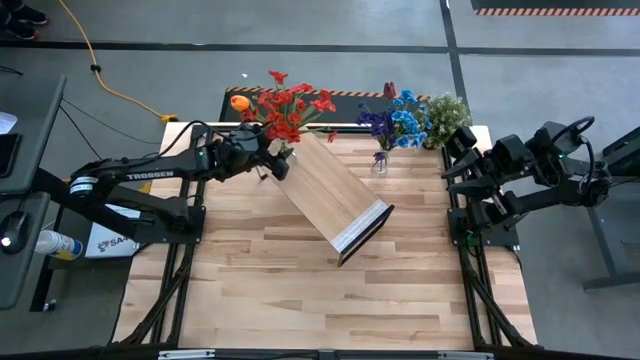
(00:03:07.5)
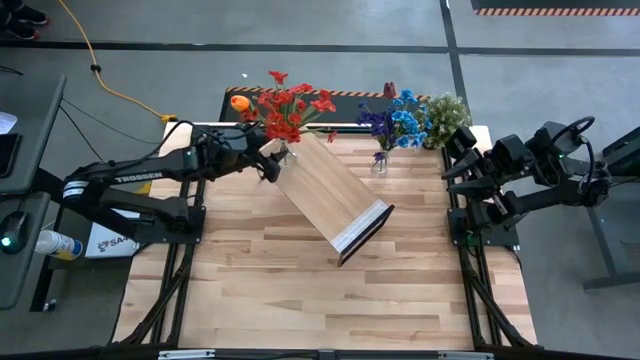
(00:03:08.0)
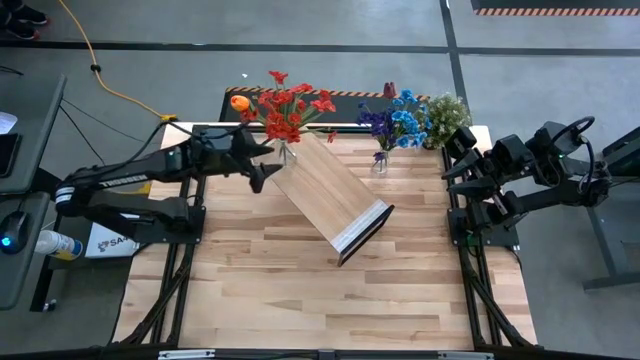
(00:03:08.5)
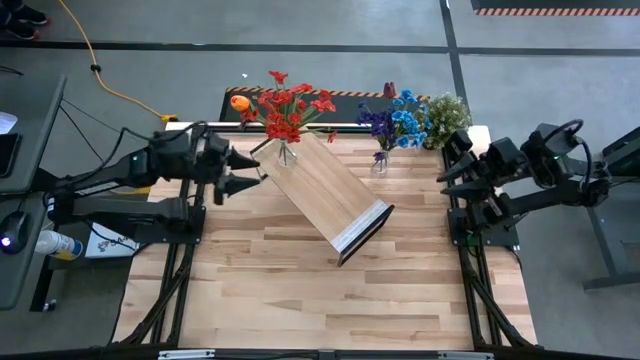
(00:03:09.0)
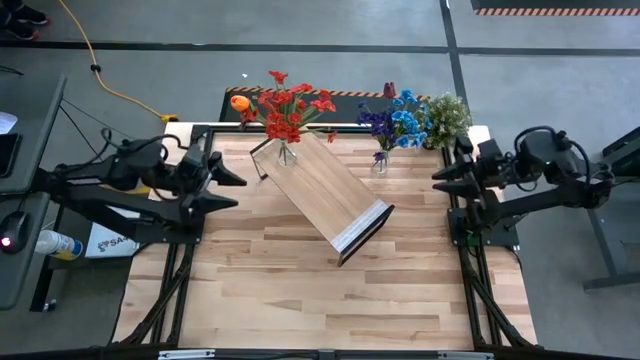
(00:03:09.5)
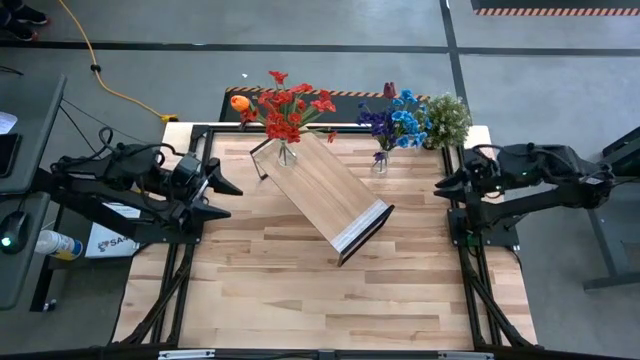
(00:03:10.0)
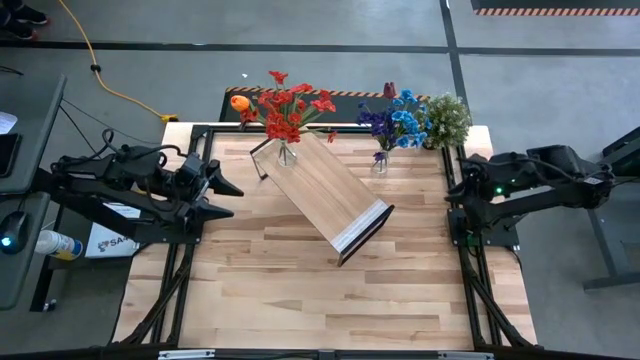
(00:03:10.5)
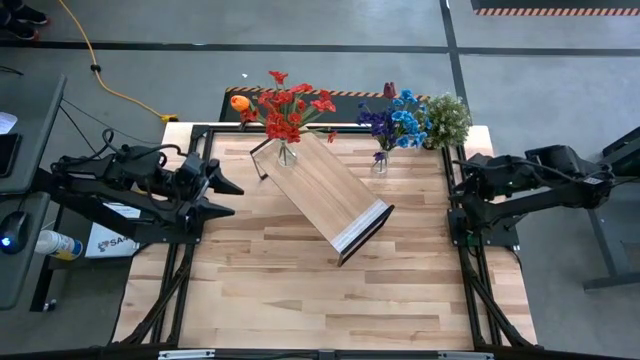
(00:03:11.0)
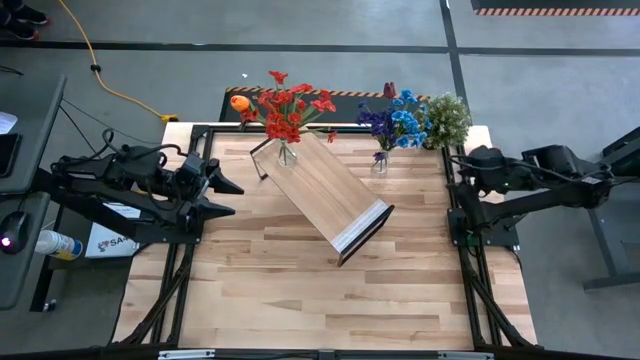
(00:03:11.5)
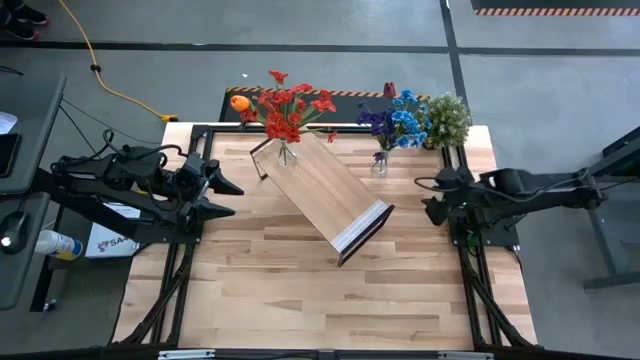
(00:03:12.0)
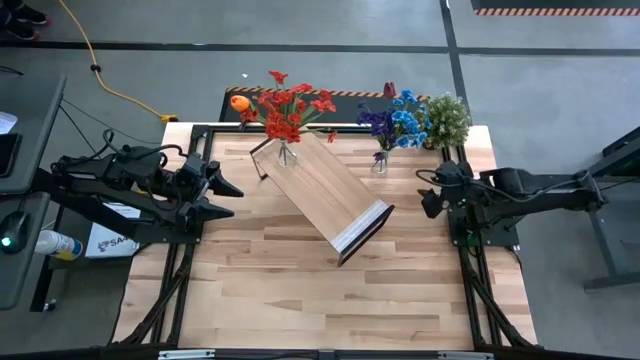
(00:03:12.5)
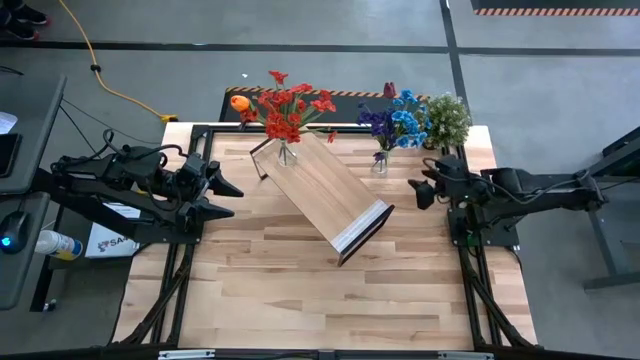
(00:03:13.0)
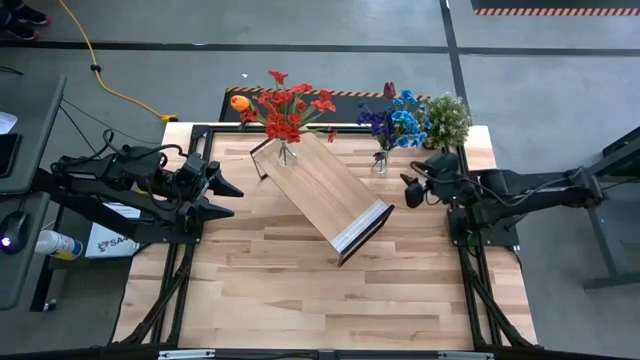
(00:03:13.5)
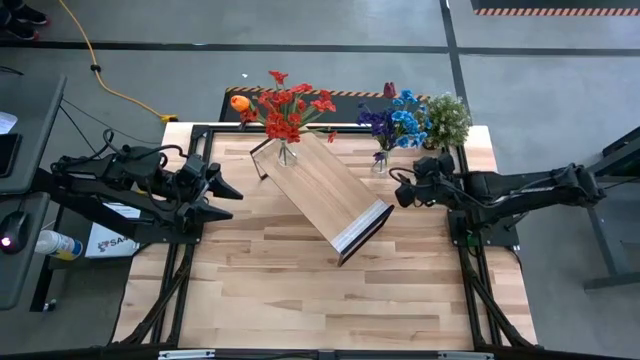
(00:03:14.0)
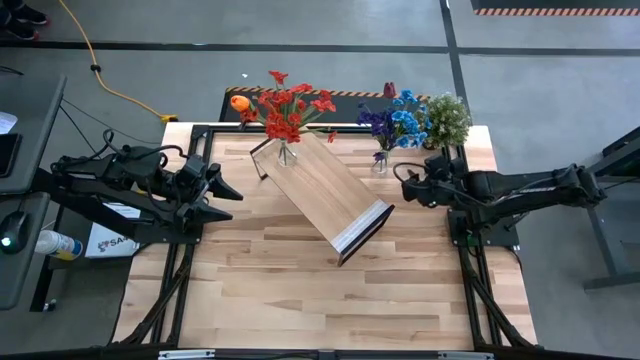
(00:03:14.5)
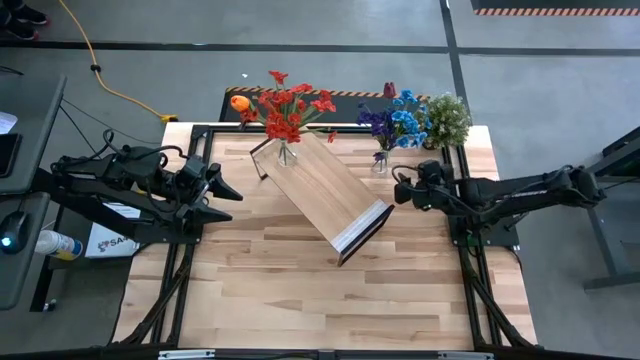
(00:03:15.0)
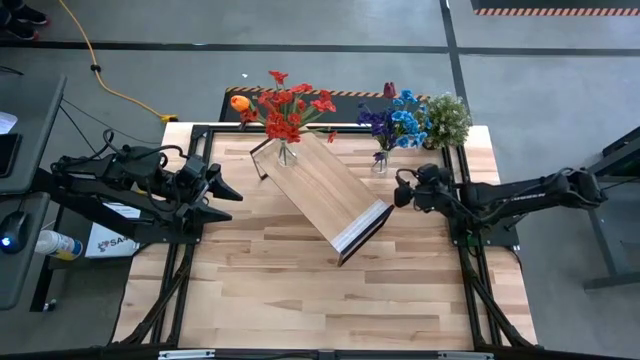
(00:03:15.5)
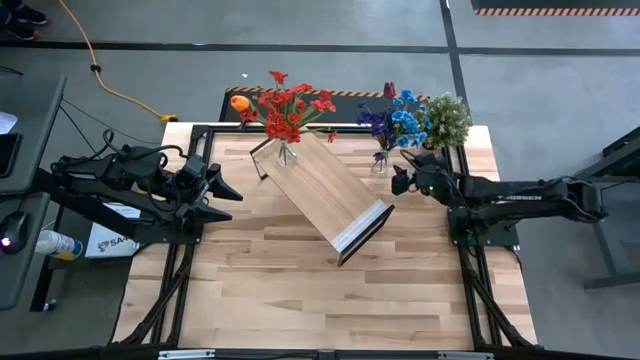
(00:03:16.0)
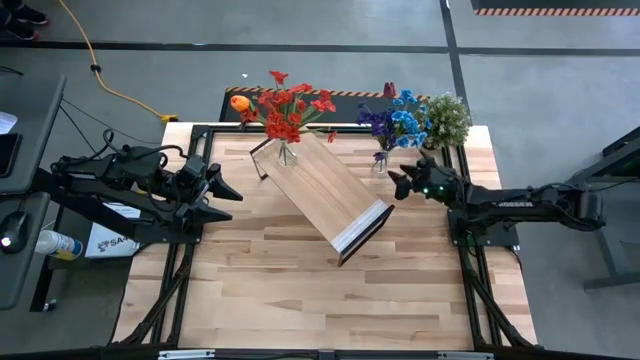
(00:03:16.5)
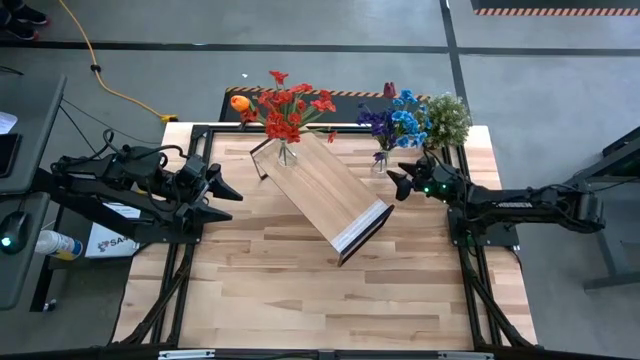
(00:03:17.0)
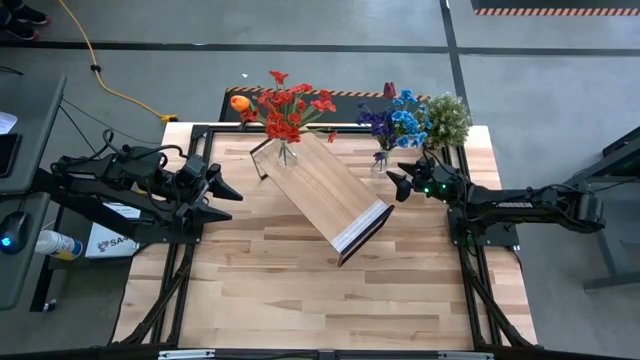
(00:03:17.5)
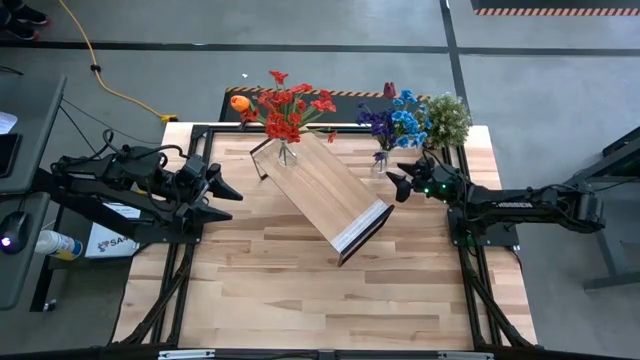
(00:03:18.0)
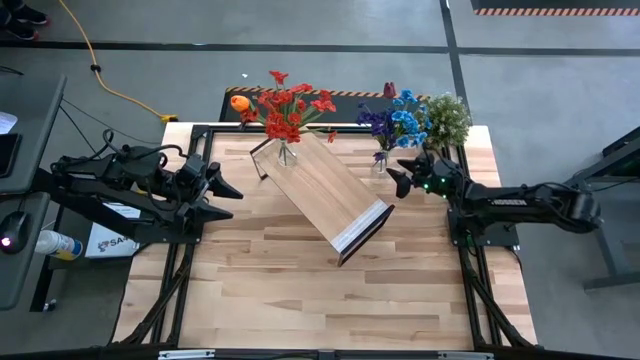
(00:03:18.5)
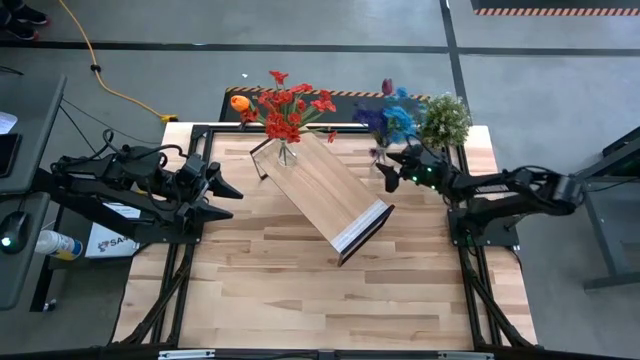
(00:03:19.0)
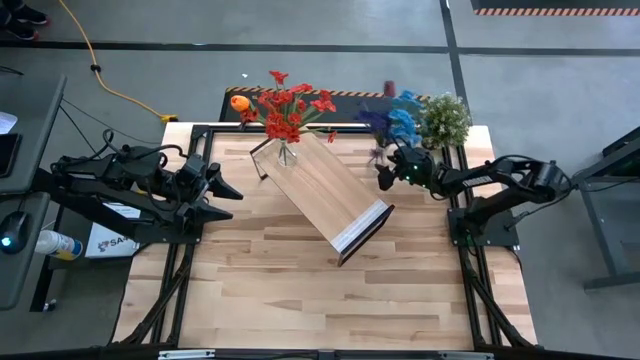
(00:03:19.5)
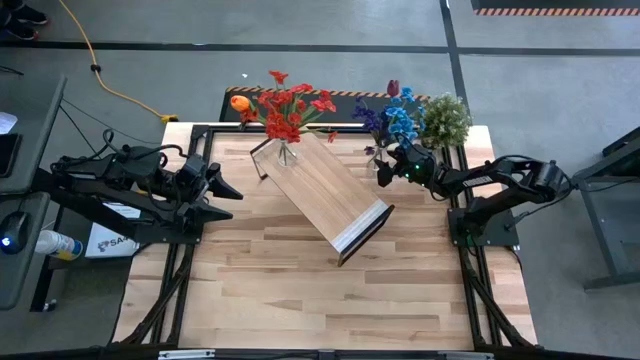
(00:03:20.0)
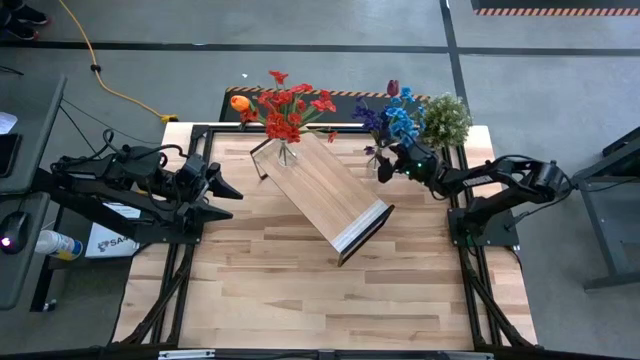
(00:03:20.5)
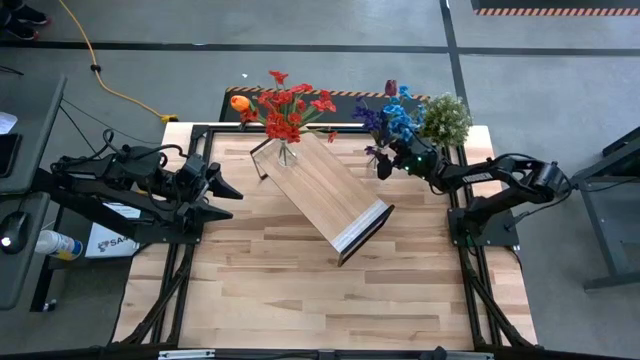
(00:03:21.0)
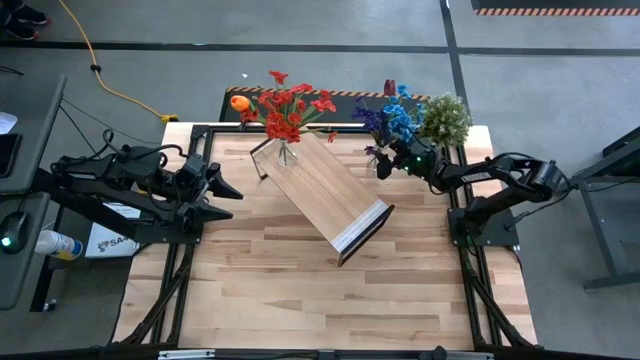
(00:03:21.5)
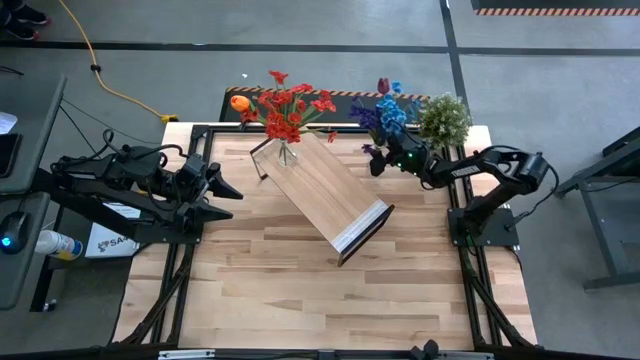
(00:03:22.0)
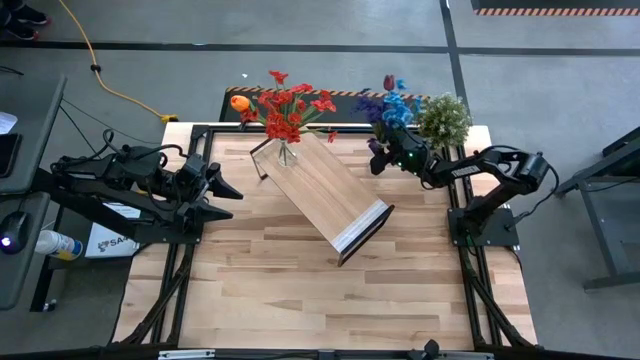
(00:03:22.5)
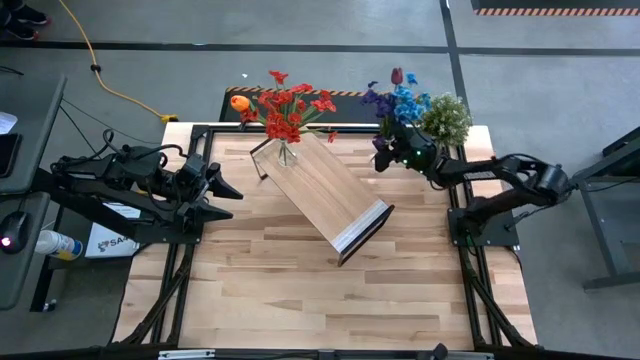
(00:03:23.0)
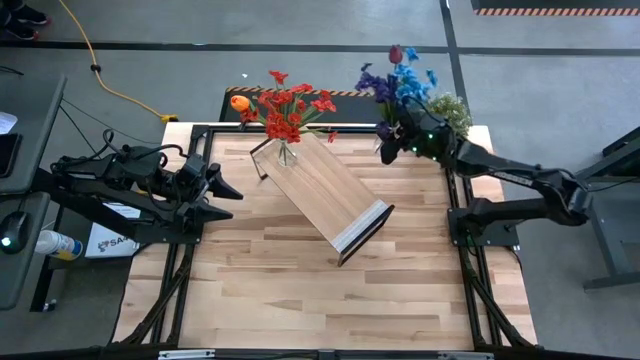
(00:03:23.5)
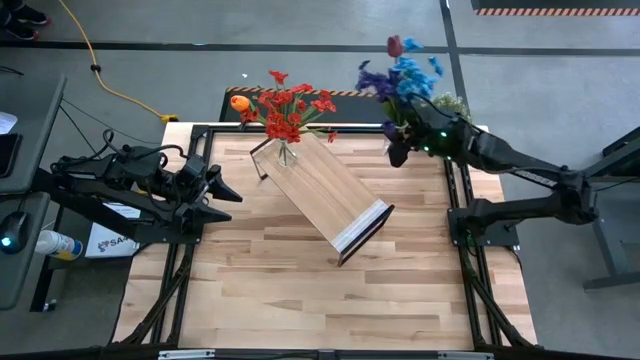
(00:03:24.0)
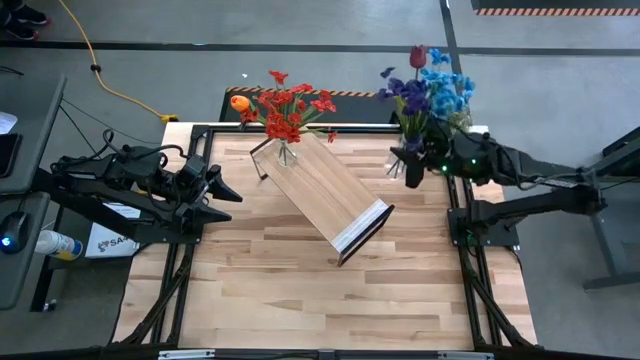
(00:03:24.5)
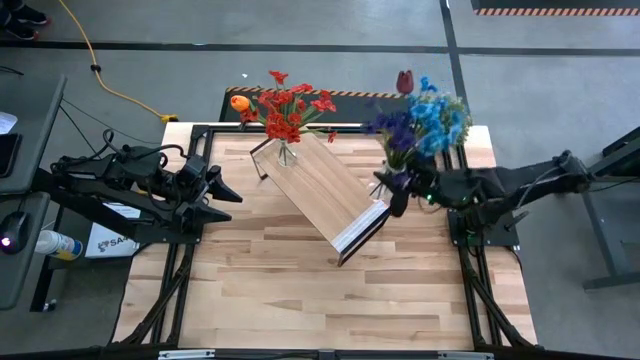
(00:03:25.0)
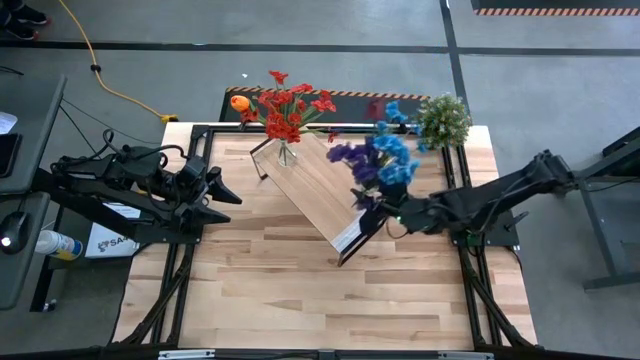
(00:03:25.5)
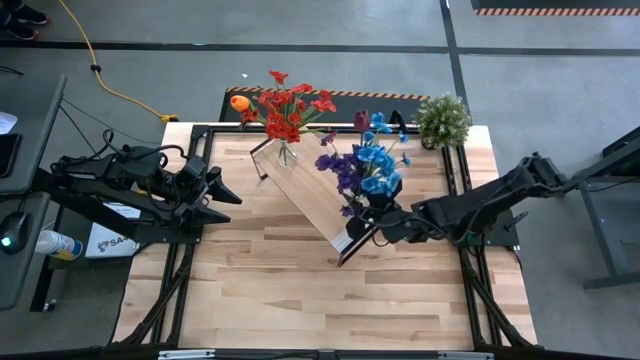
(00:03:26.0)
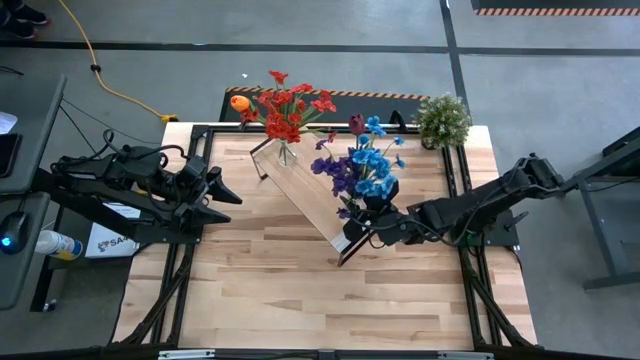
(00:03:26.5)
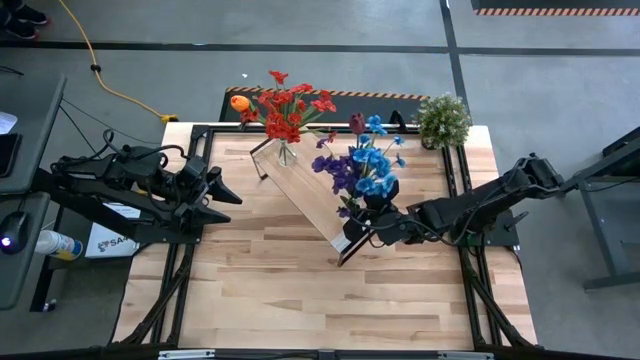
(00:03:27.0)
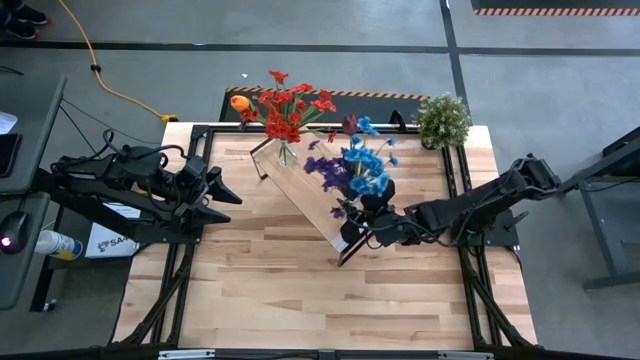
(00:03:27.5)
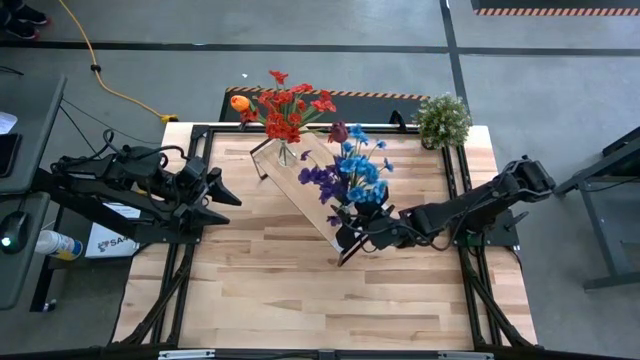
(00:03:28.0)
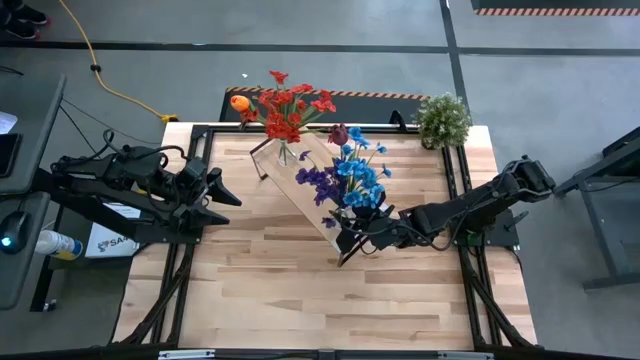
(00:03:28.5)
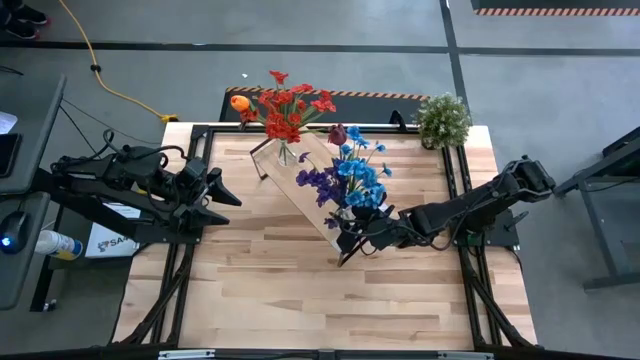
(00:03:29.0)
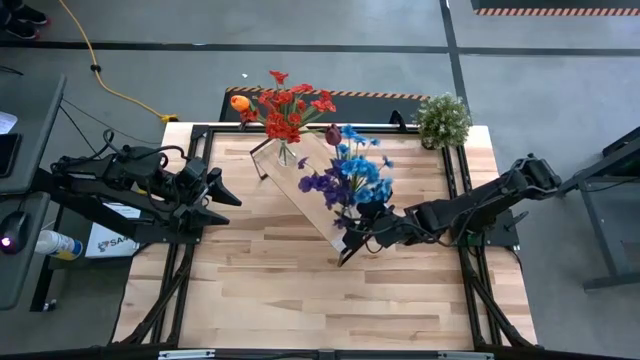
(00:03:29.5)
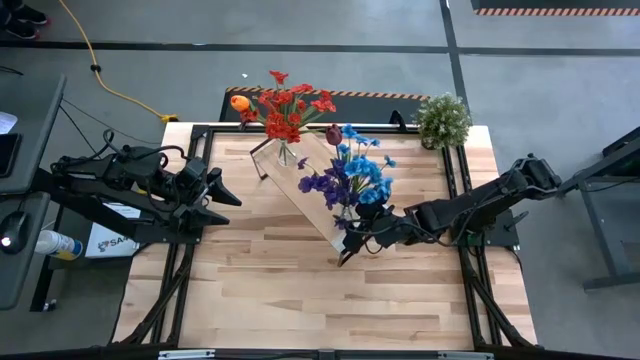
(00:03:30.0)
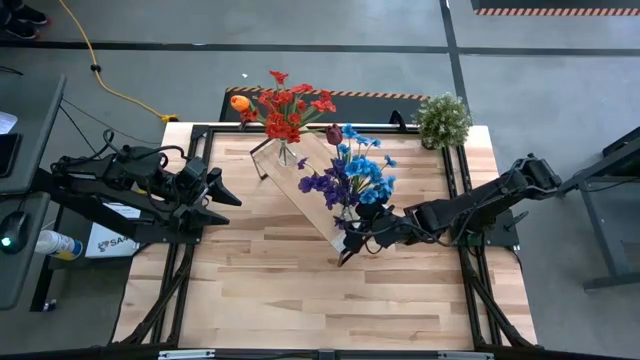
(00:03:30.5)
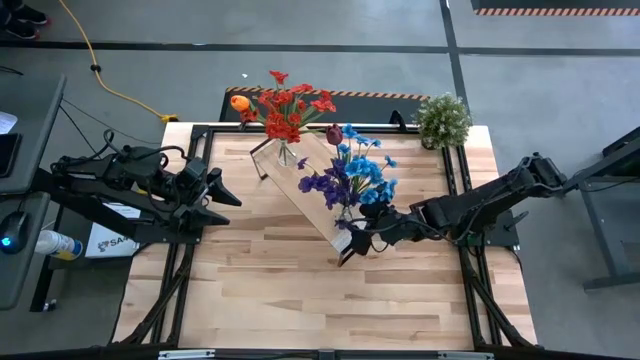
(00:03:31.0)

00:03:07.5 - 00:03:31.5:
Task: Pick and place flowers into a vace then onto a shelf
Put the transparent vase on the shelf
